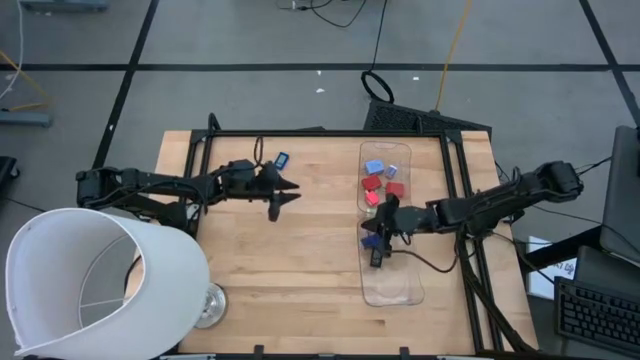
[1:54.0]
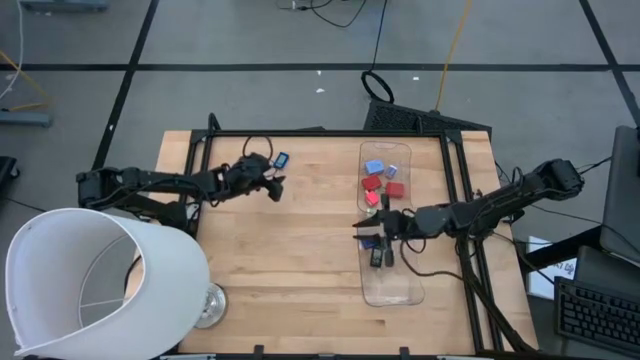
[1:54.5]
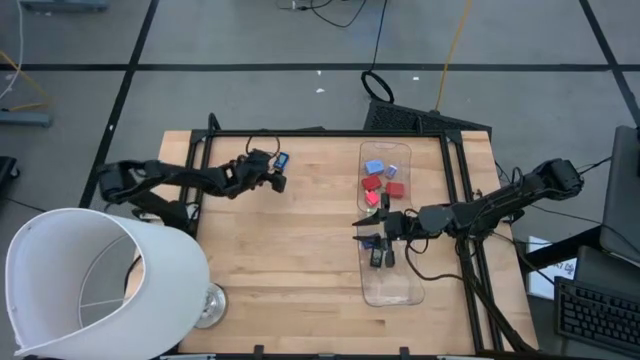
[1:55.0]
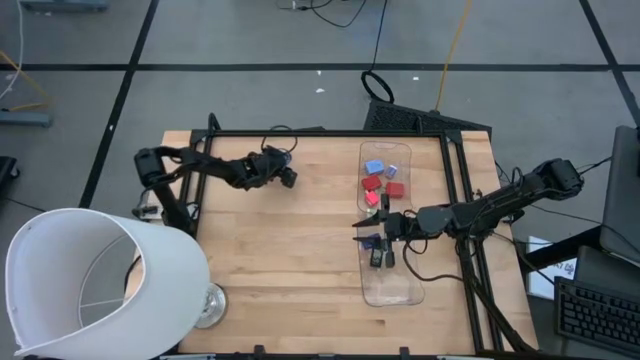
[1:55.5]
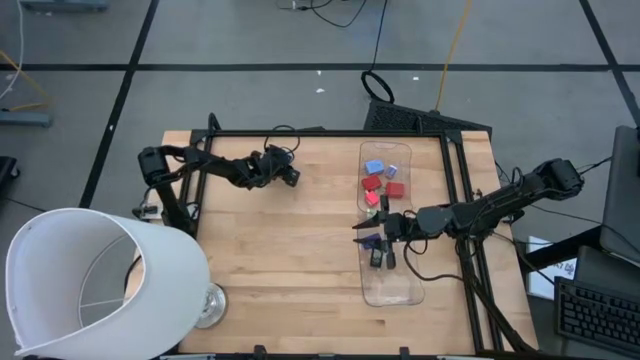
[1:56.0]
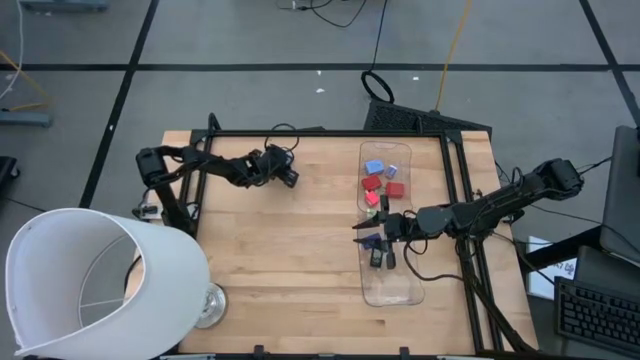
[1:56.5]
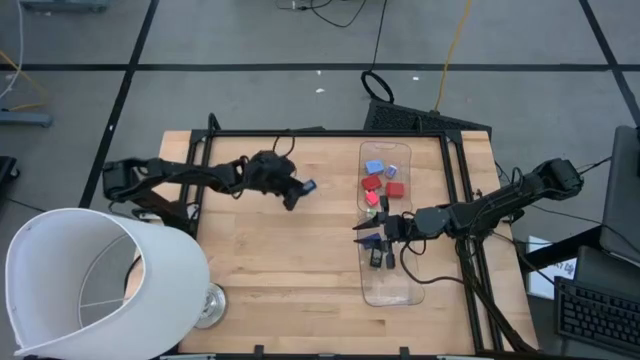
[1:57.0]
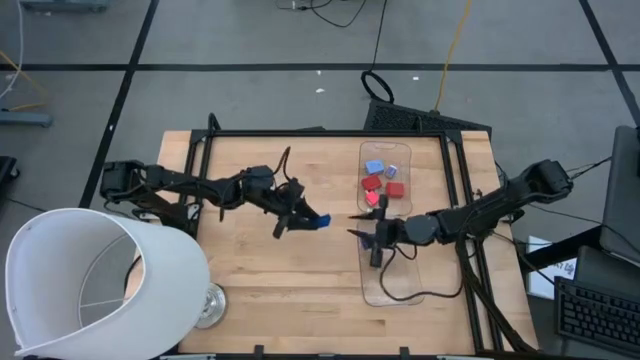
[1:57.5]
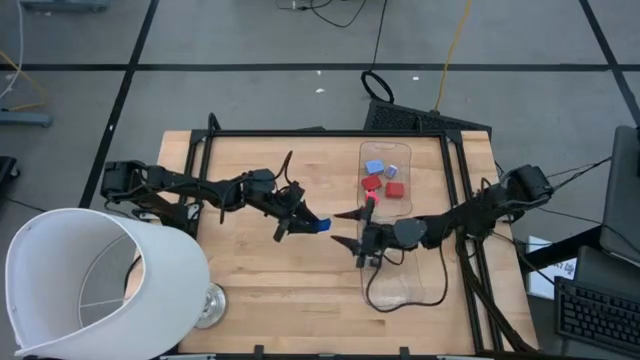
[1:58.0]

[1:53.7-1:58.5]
Task: Pick & Place Office items
Put the blue digital clock into the bottom transparent bin

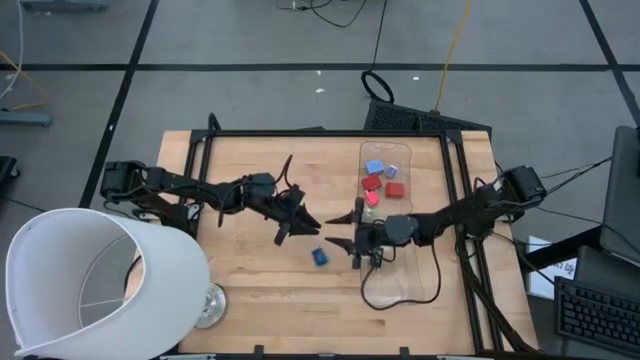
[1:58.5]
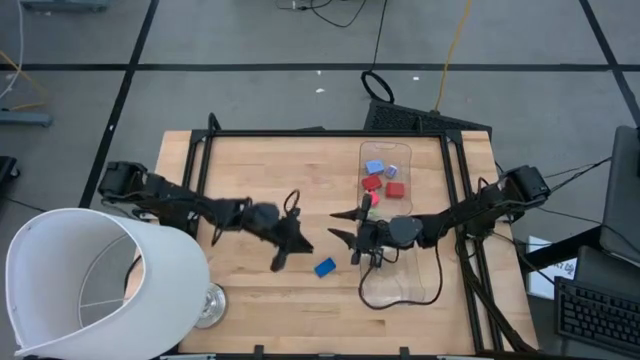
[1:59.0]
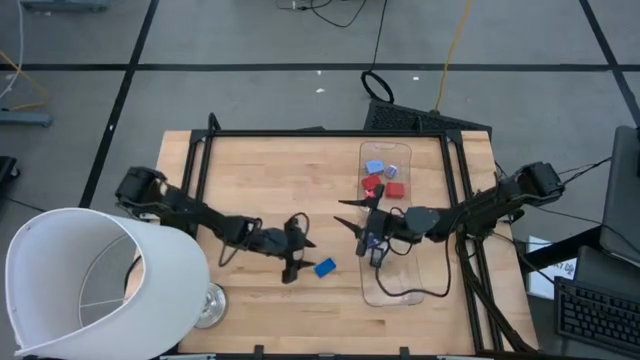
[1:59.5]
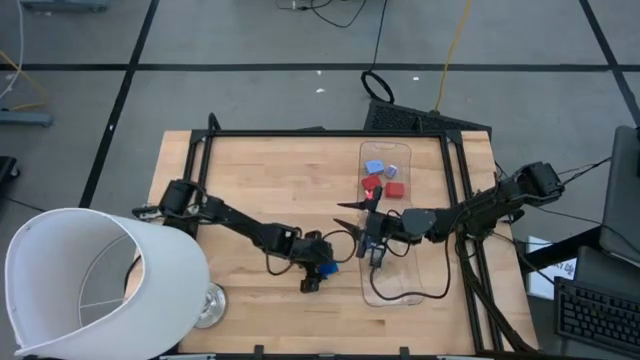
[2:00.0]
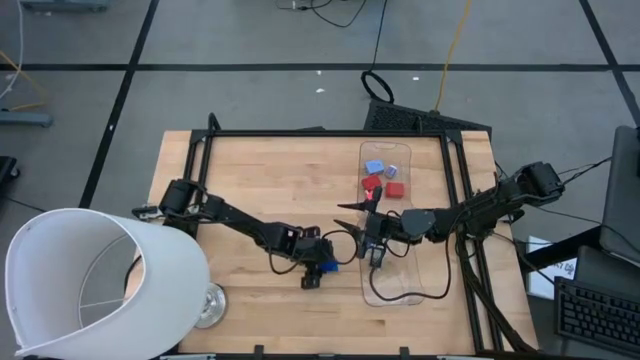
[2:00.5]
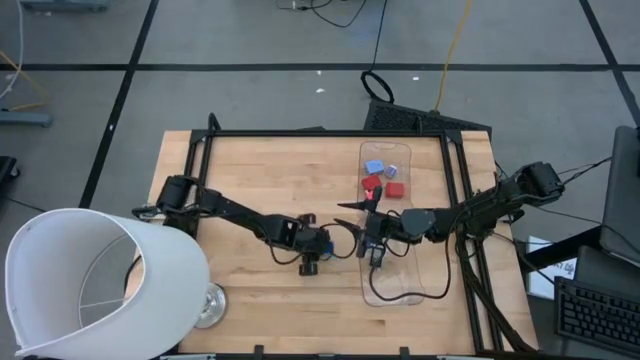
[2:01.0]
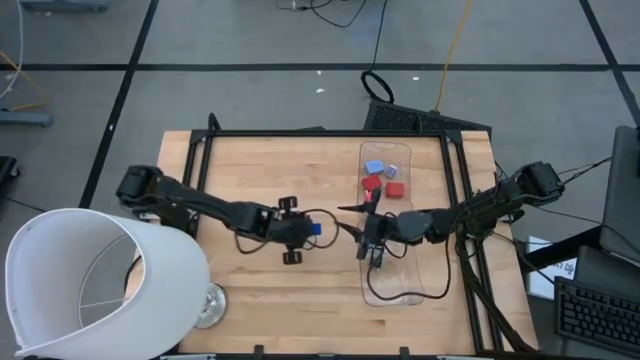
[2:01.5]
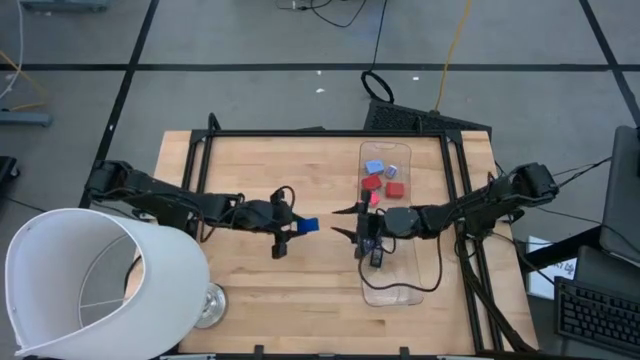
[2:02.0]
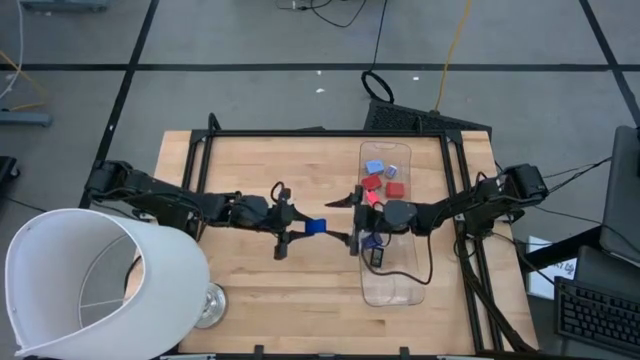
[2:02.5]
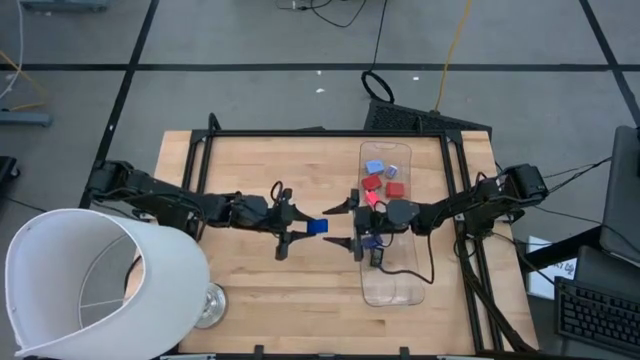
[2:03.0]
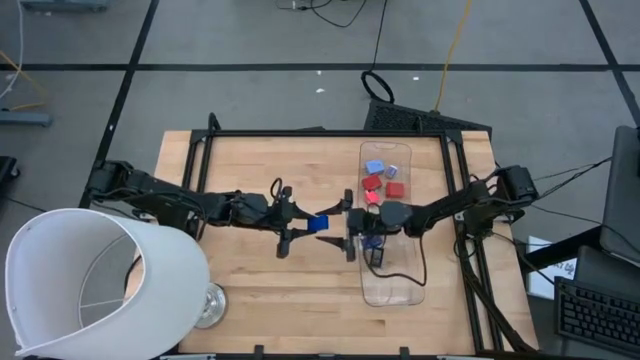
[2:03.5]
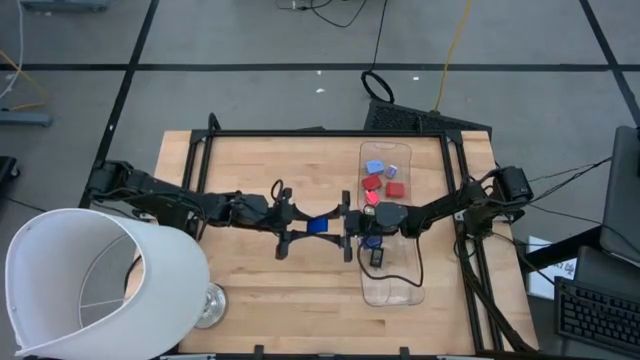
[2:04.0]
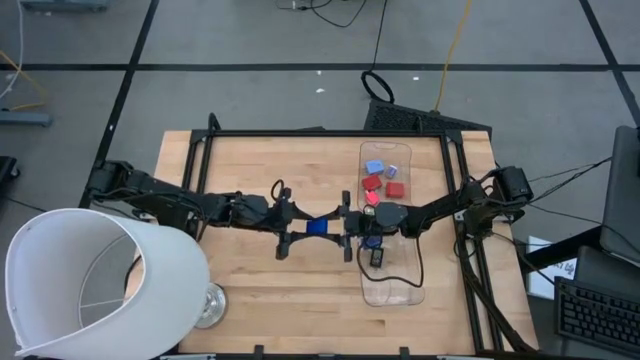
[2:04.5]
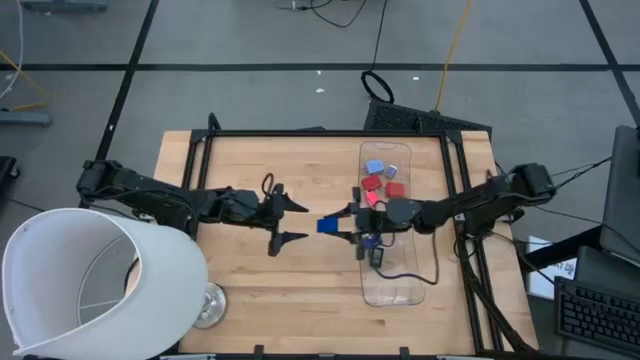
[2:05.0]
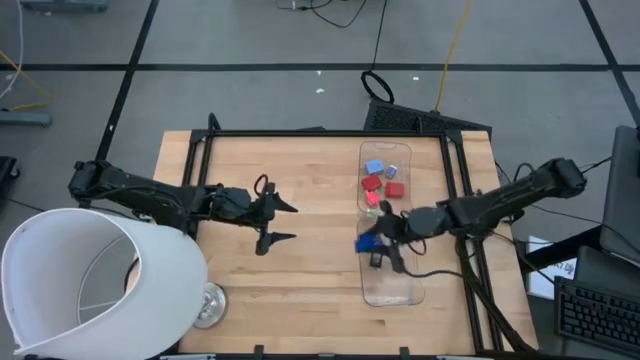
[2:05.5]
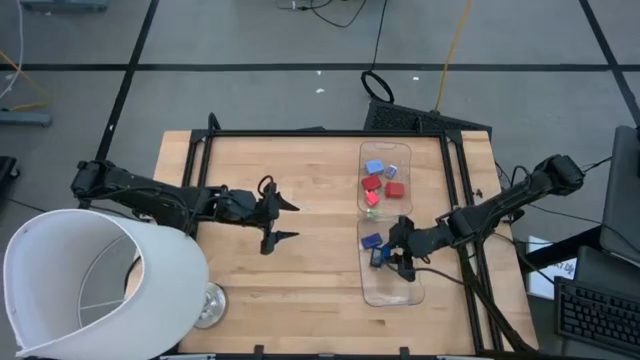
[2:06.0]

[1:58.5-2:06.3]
Put the blue digital clock into the bottom transparent bin

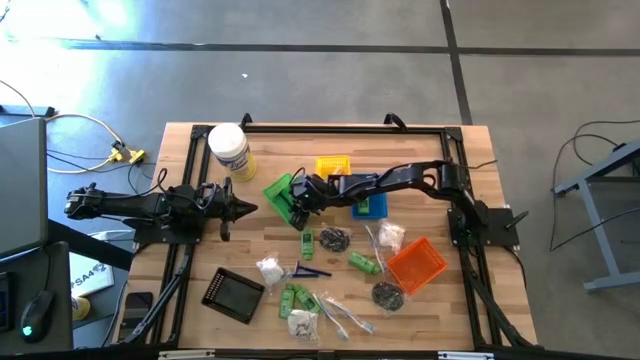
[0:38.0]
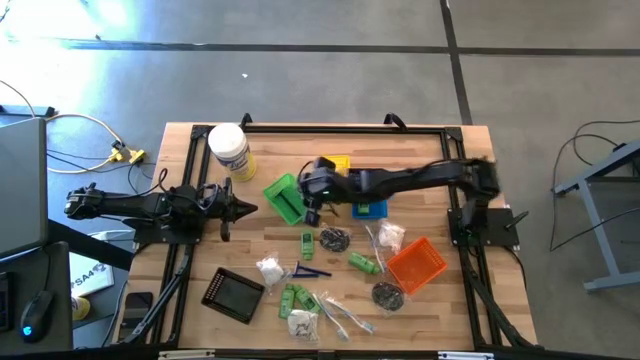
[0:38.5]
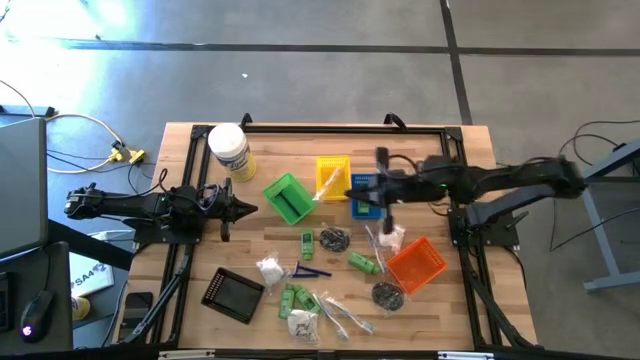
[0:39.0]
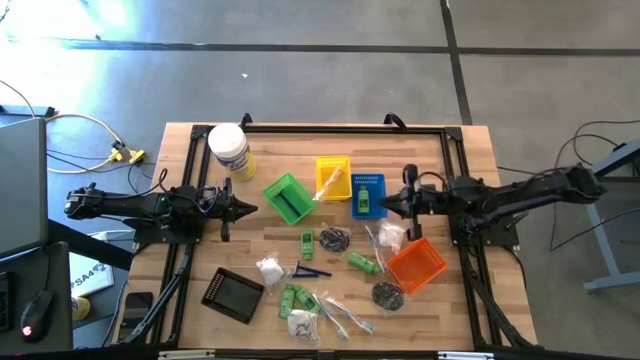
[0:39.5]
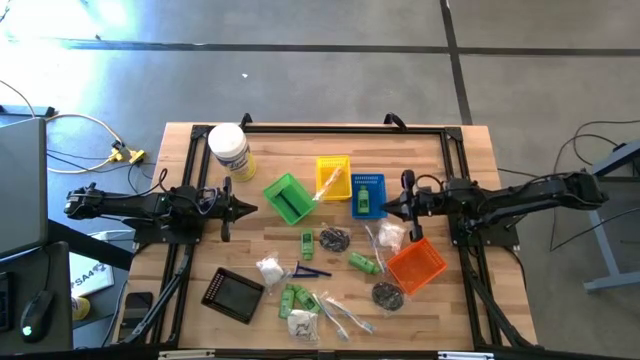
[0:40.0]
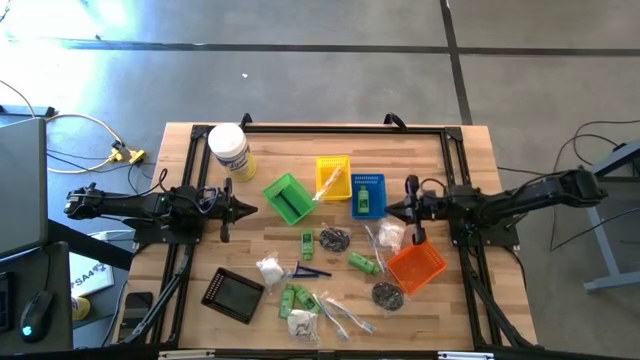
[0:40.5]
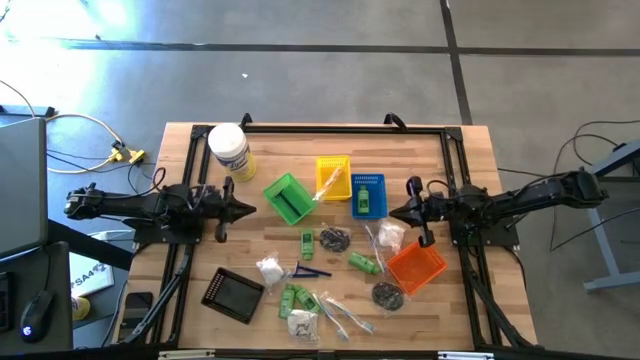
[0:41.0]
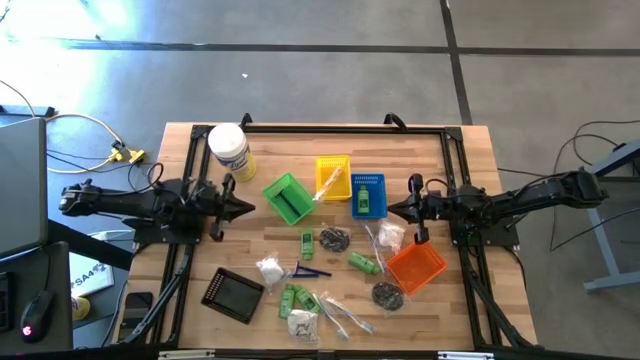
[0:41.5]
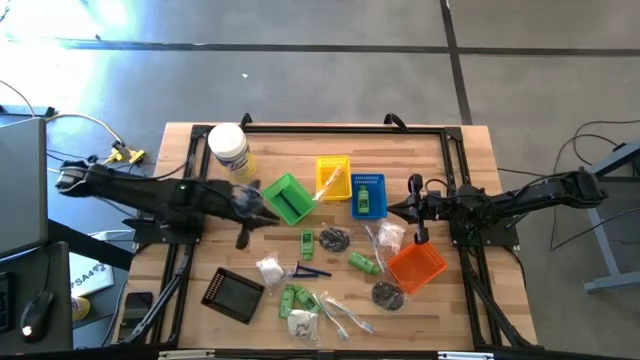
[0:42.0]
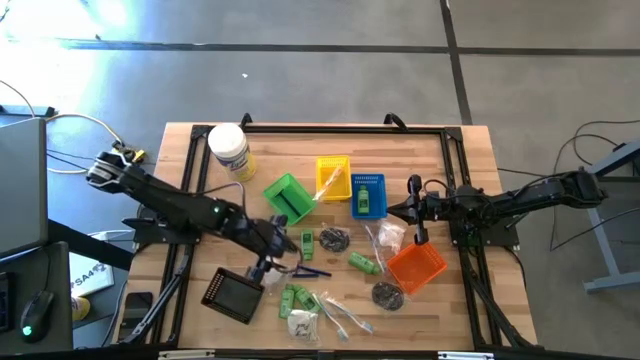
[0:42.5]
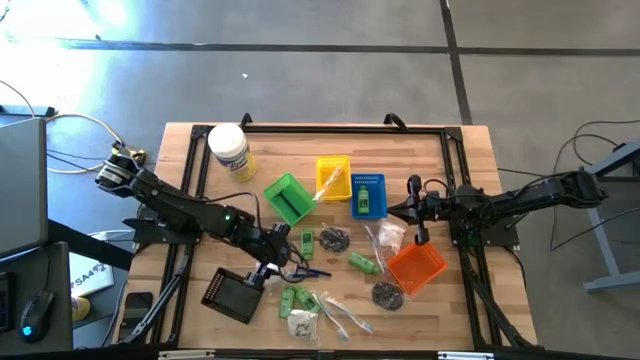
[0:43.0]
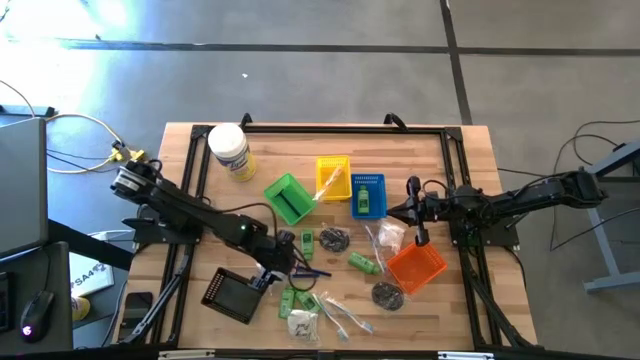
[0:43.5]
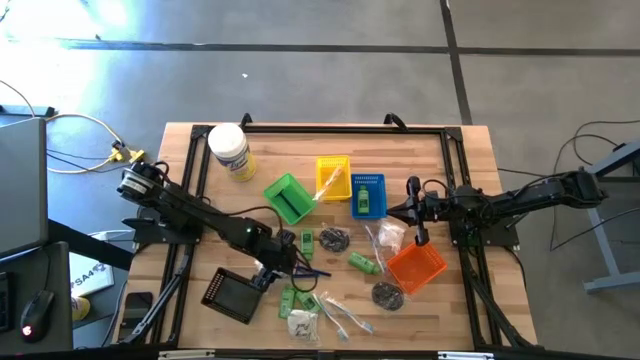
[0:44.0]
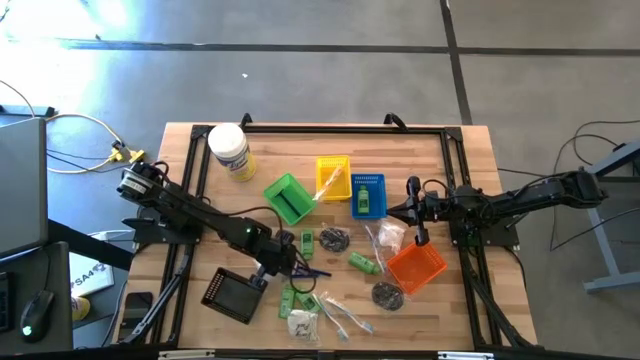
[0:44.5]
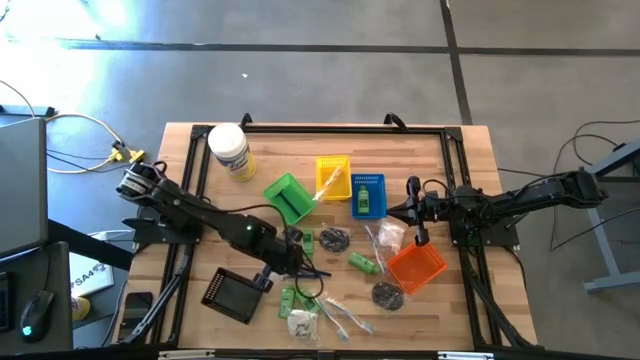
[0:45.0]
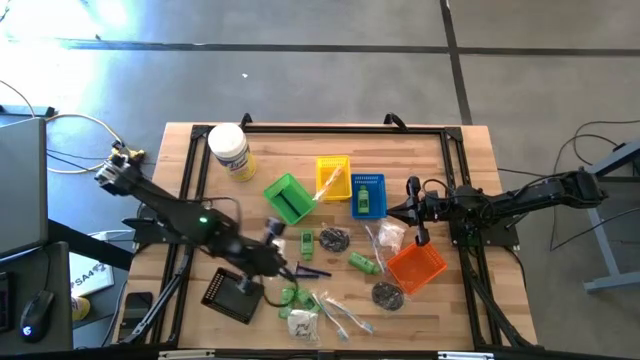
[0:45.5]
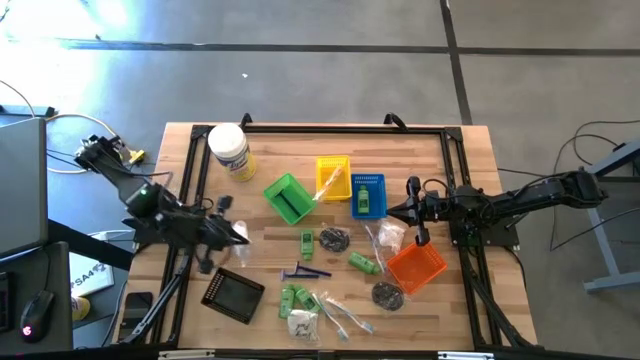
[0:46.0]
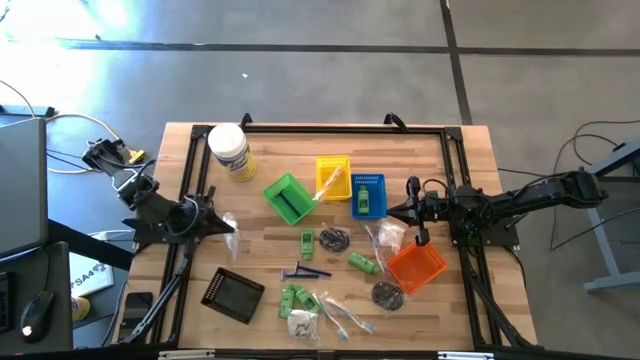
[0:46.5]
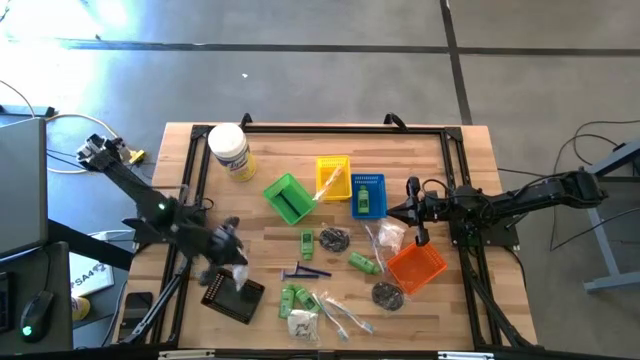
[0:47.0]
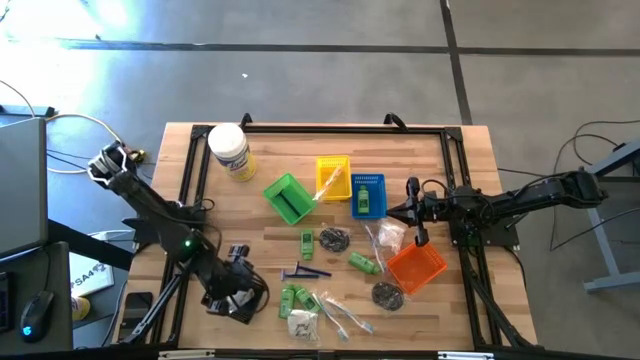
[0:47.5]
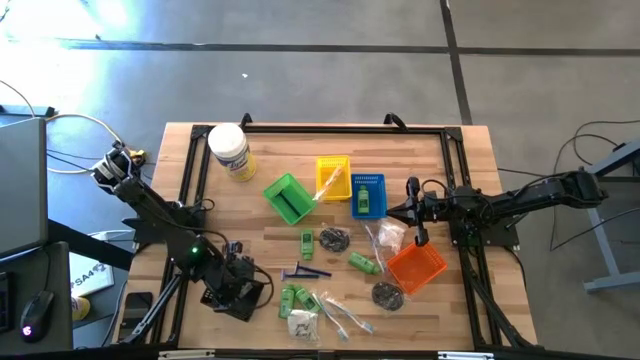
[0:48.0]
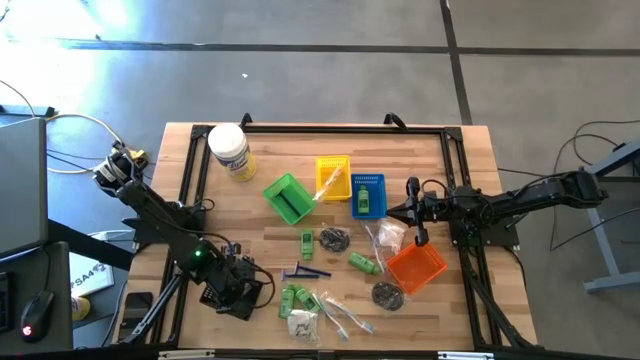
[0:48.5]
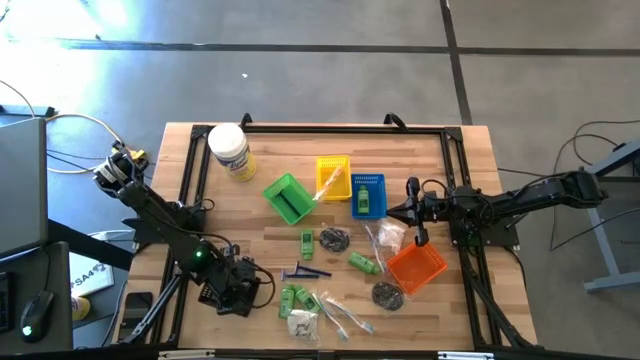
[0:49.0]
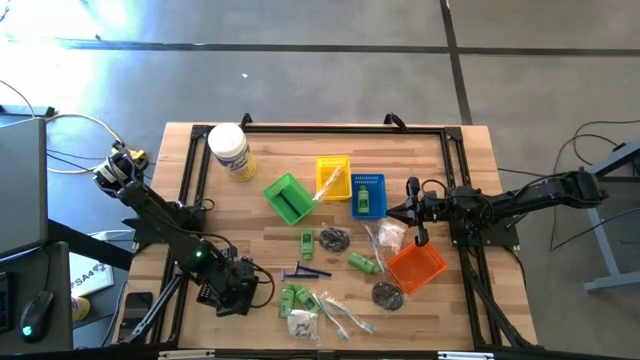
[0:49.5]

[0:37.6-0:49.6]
Task: Pick & Place Travel size toiletries
Put the cotton pack into the black basket
